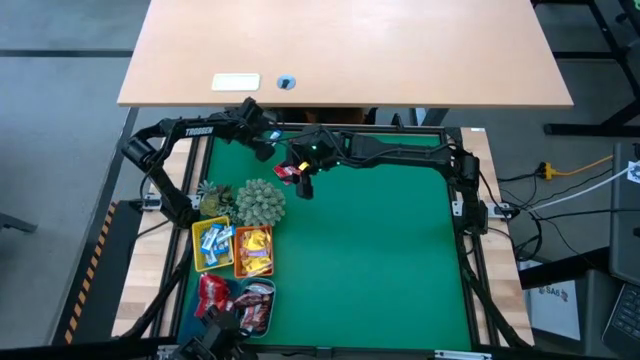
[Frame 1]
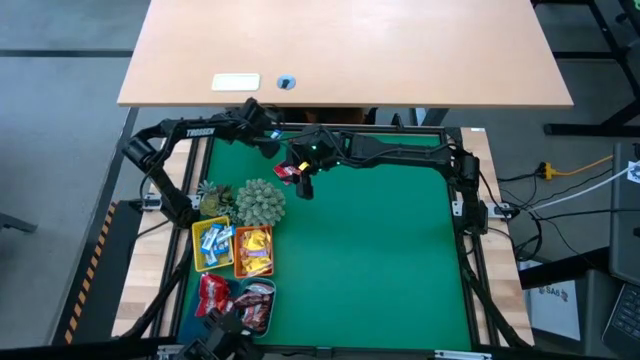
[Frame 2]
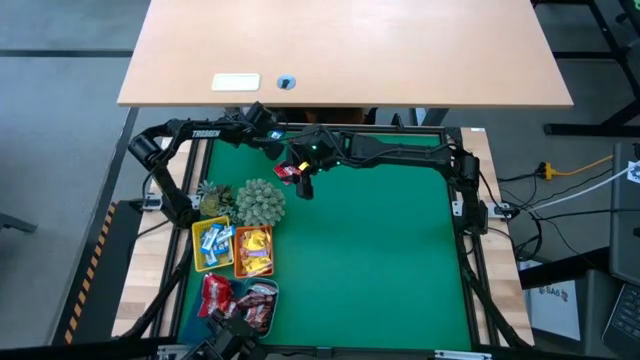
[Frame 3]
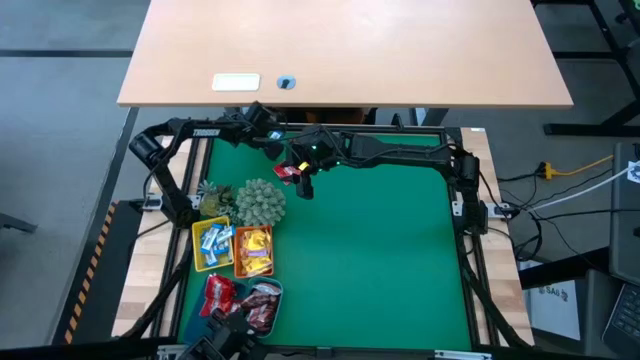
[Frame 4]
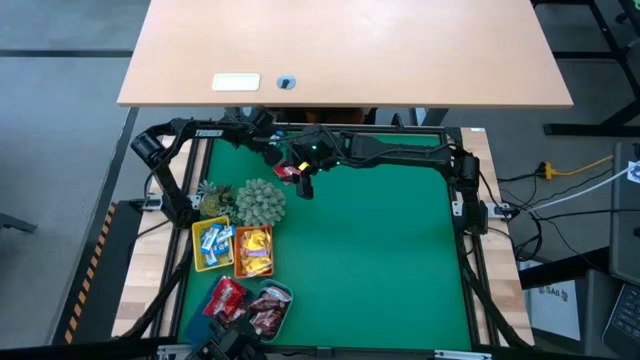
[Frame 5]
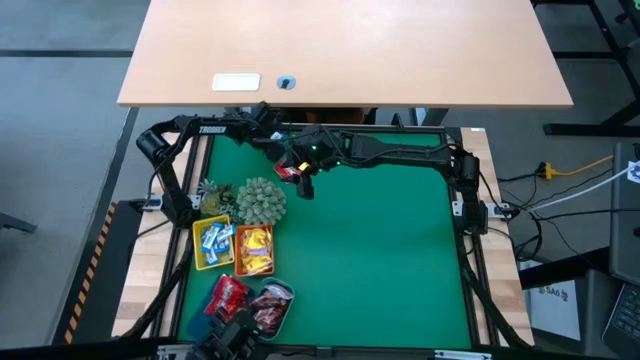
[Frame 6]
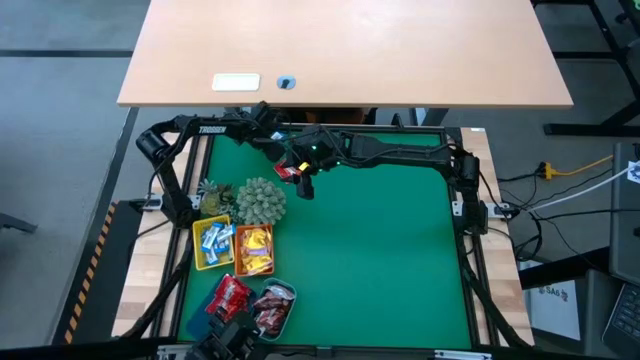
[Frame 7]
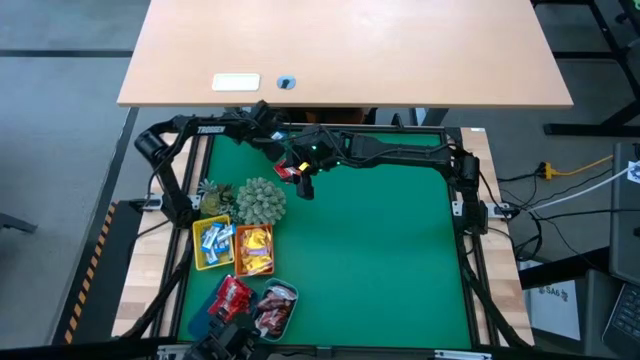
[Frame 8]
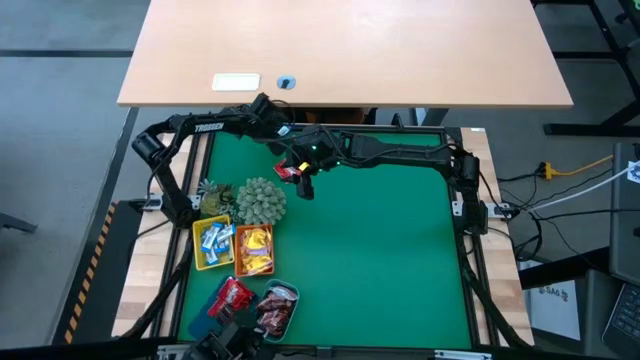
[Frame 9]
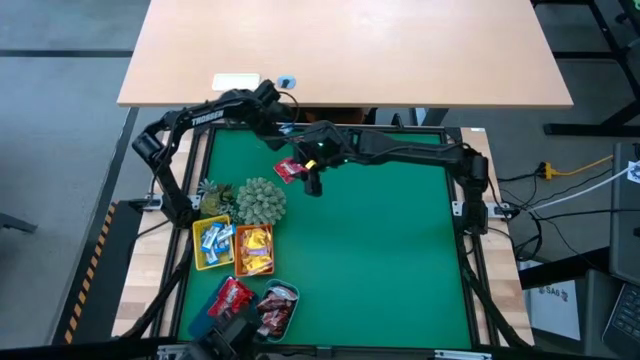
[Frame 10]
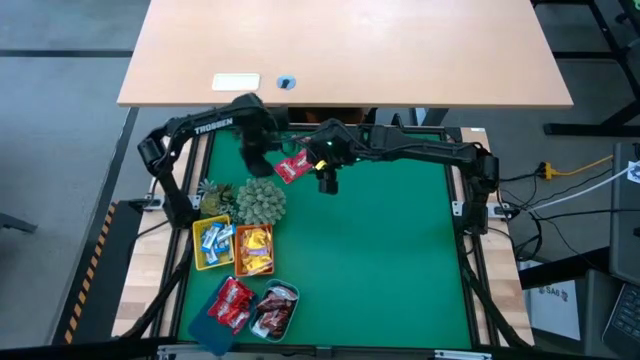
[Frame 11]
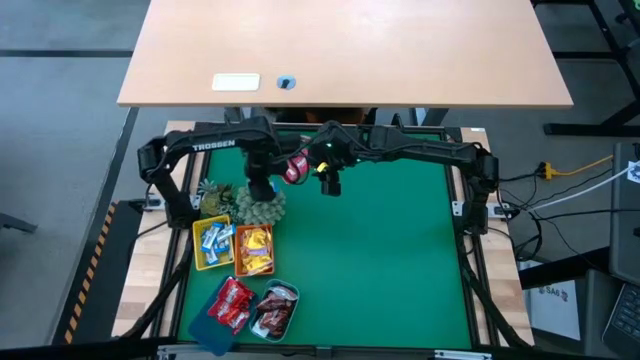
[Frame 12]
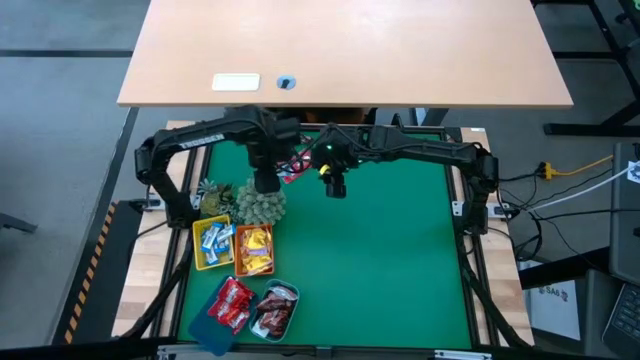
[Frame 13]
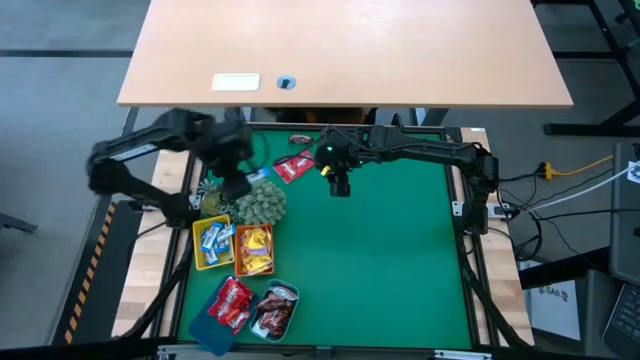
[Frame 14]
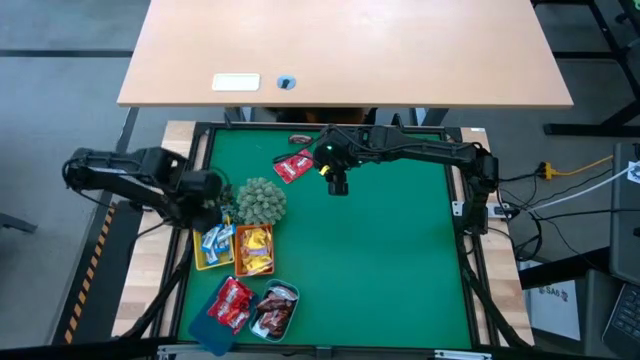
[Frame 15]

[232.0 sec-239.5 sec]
Task: Sort candy
Put the white chocolate into the yellow basket

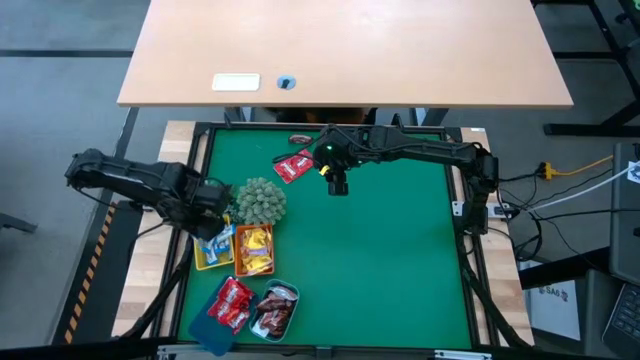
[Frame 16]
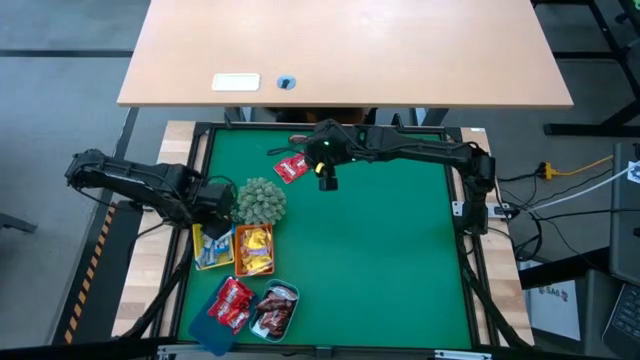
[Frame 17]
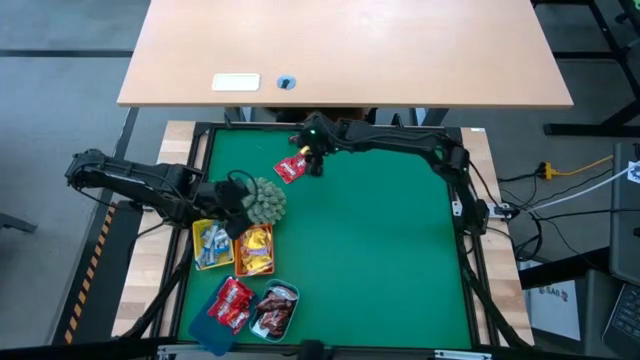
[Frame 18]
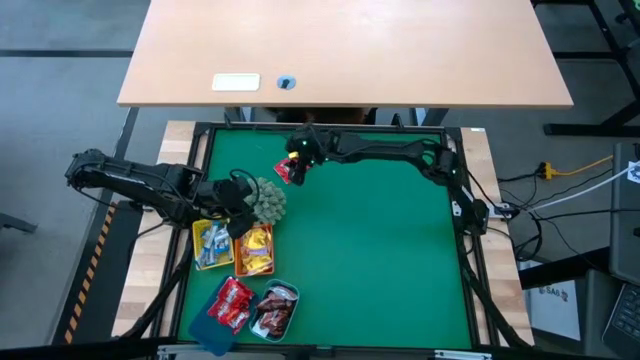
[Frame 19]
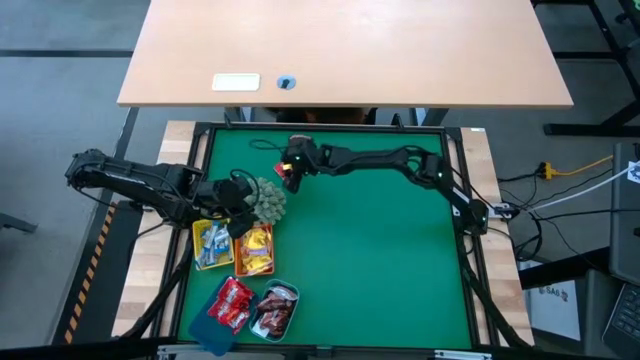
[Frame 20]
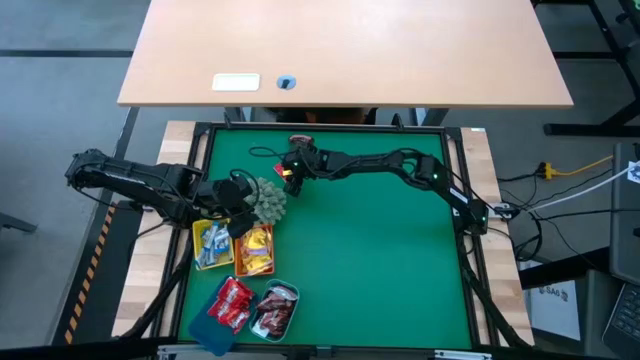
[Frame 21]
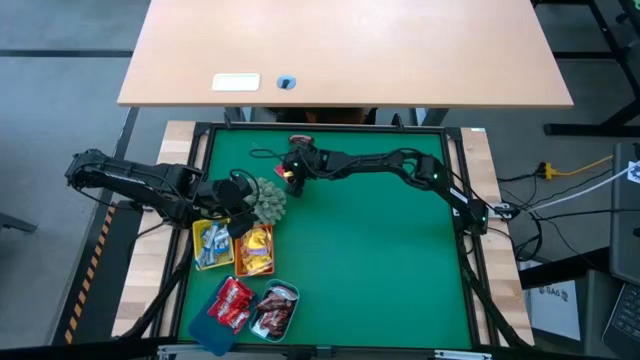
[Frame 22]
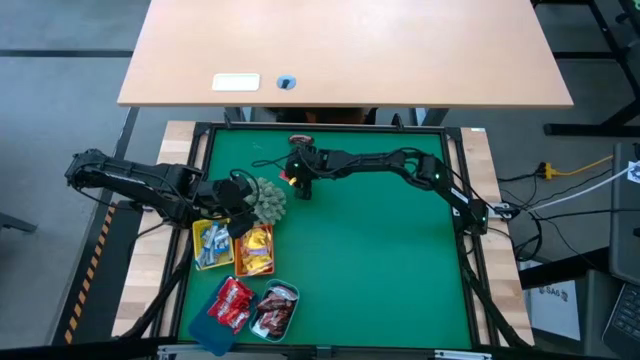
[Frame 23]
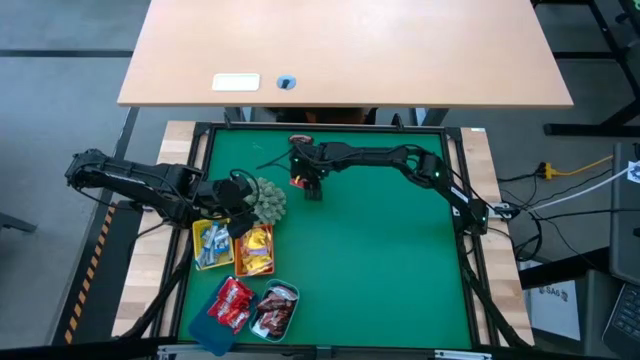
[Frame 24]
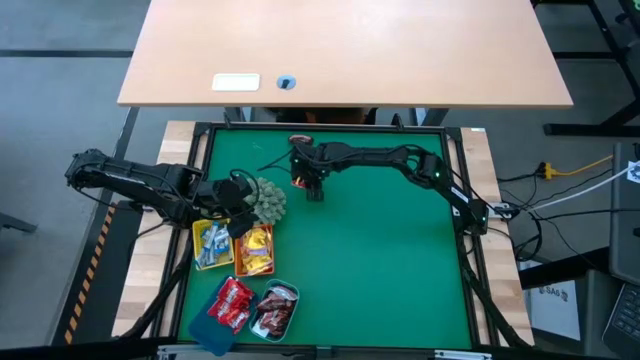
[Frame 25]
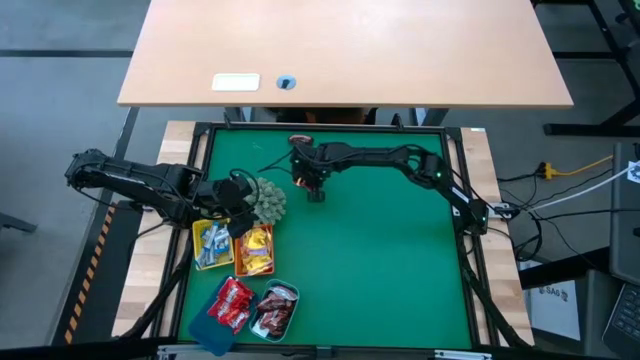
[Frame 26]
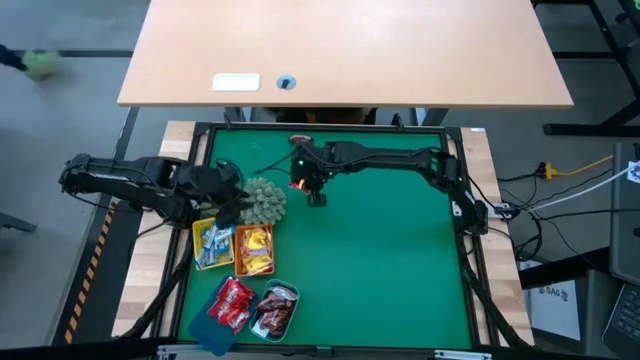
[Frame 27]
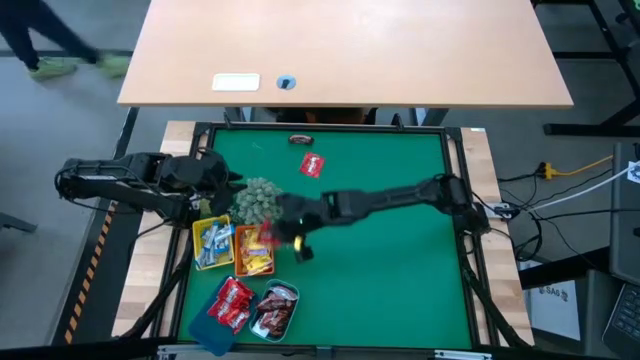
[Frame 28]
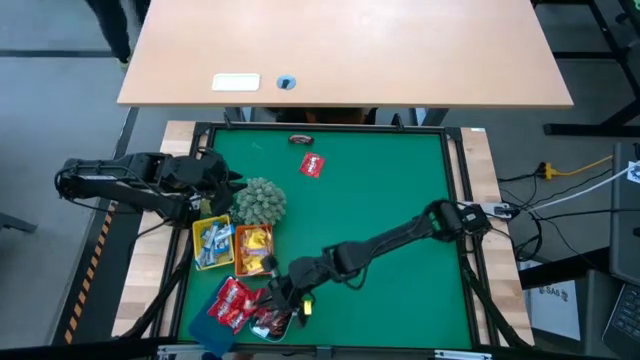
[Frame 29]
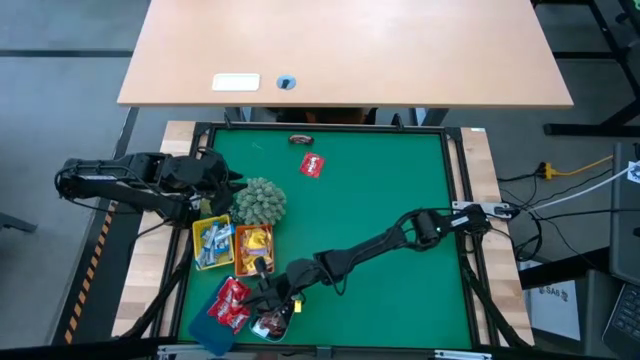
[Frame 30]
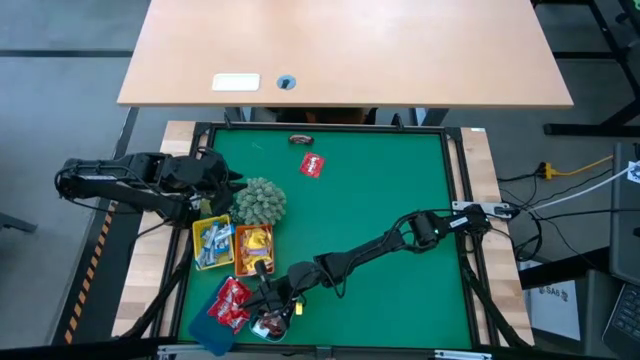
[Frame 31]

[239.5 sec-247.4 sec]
Put the red chocolate into the blue basket

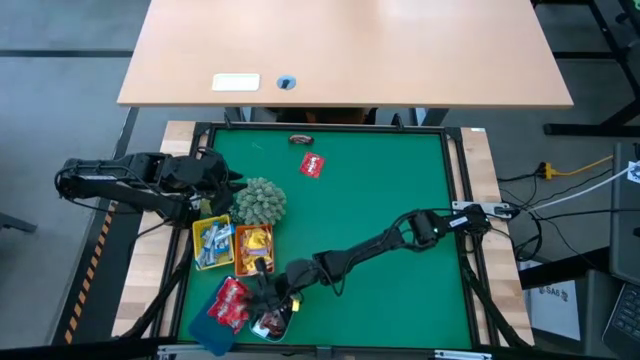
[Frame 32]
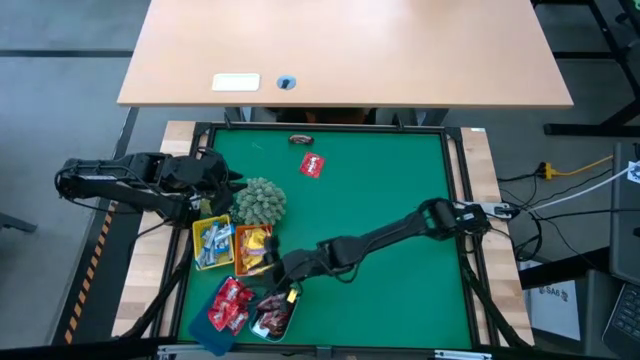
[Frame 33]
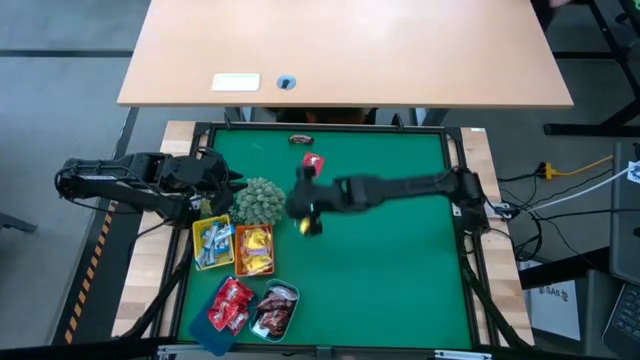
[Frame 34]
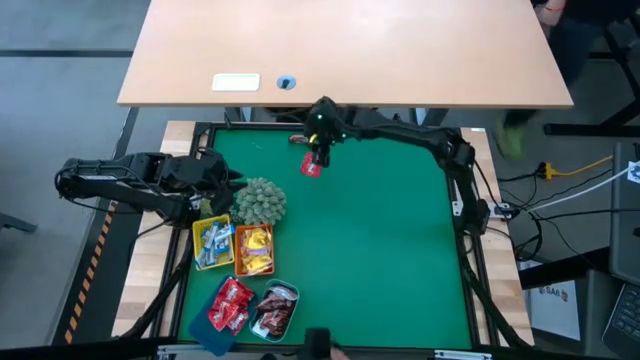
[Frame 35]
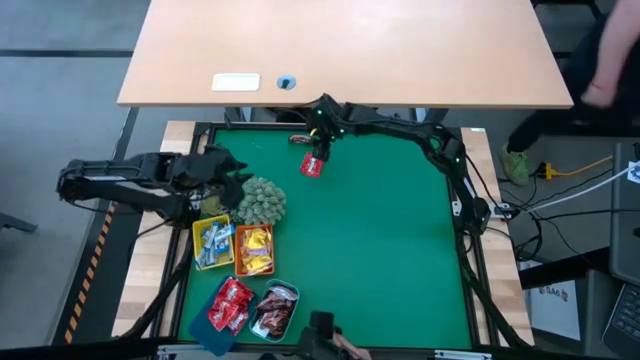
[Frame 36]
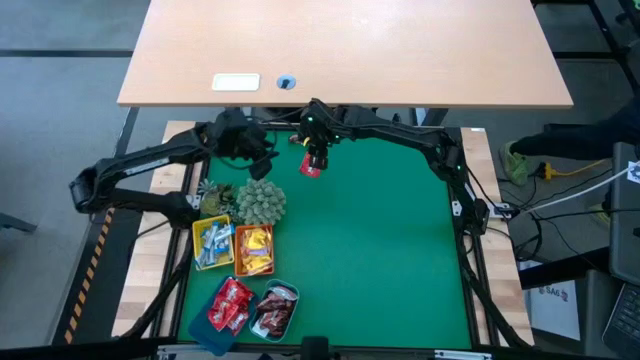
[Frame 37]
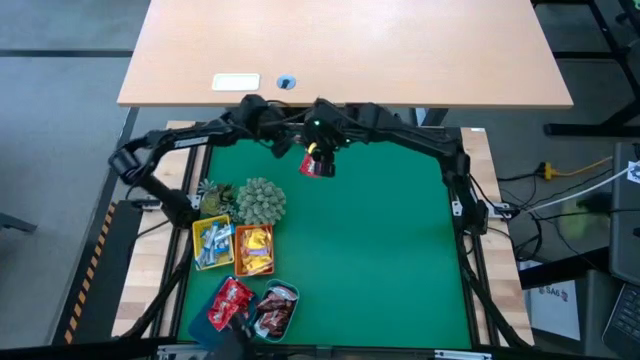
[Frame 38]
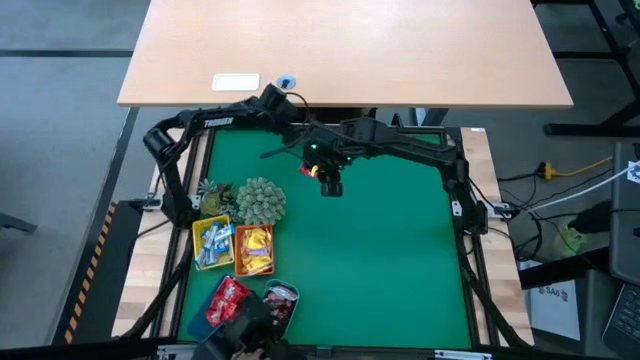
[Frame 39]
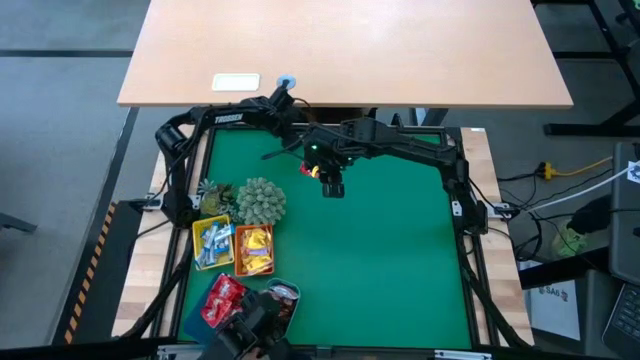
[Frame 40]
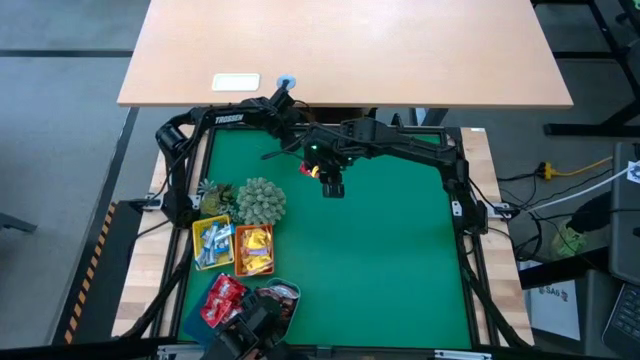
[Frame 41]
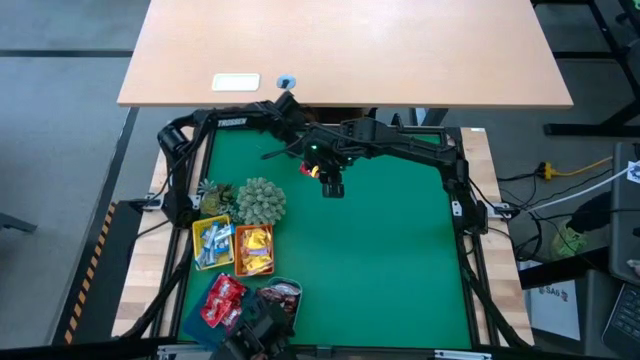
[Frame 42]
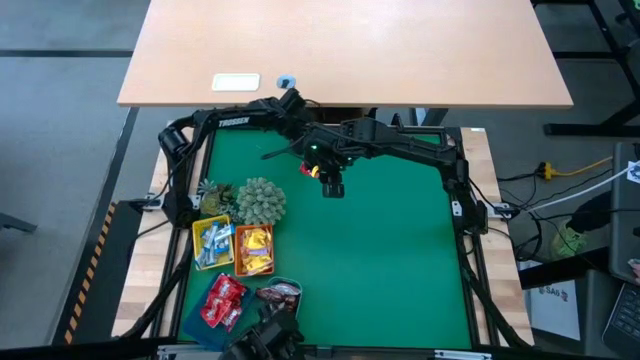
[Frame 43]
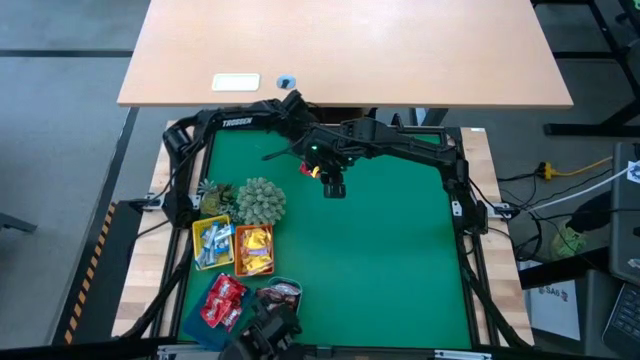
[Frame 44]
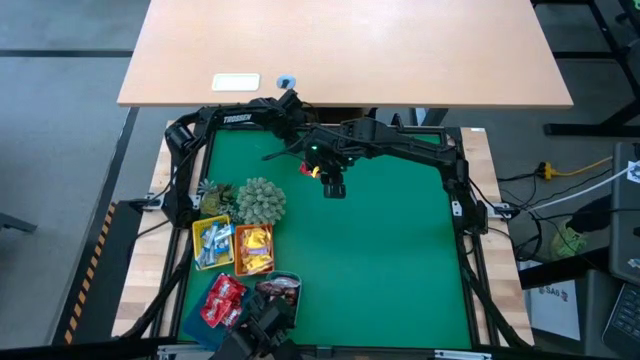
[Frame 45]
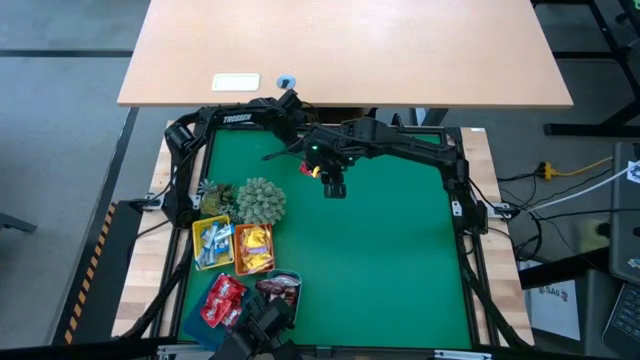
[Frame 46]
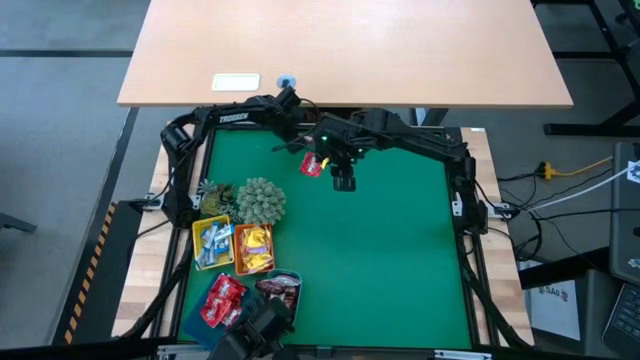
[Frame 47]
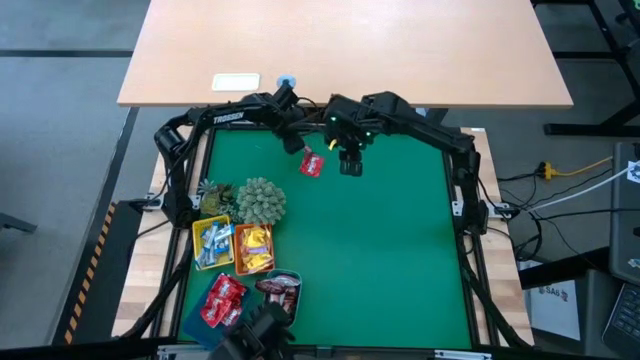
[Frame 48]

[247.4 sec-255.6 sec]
Put the brown chocolate into the green basket
